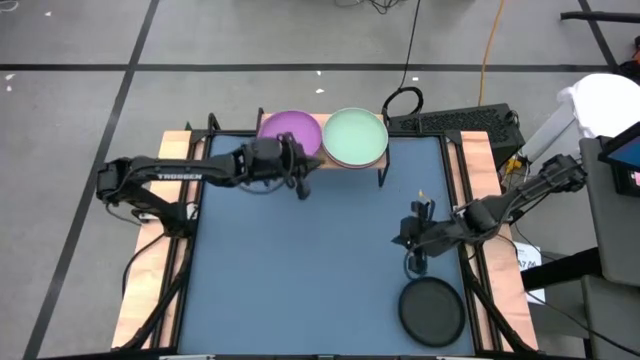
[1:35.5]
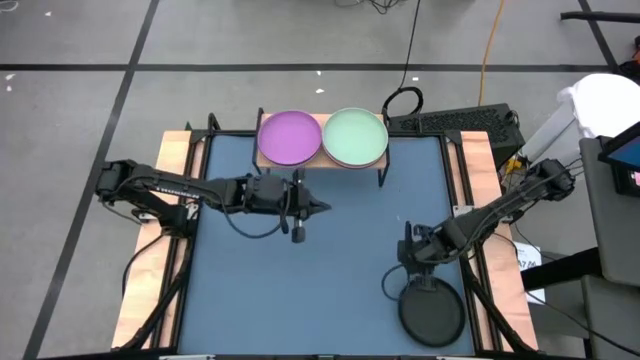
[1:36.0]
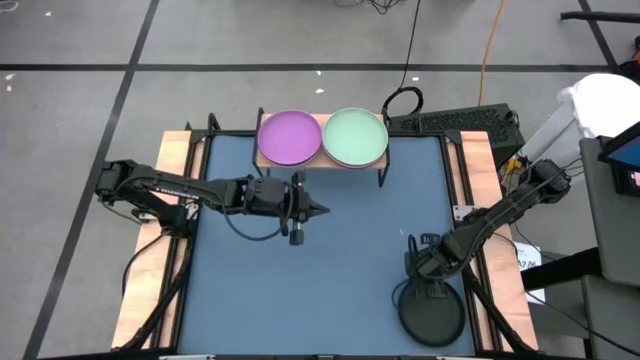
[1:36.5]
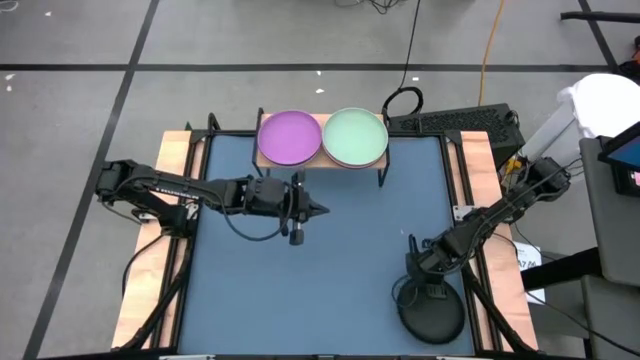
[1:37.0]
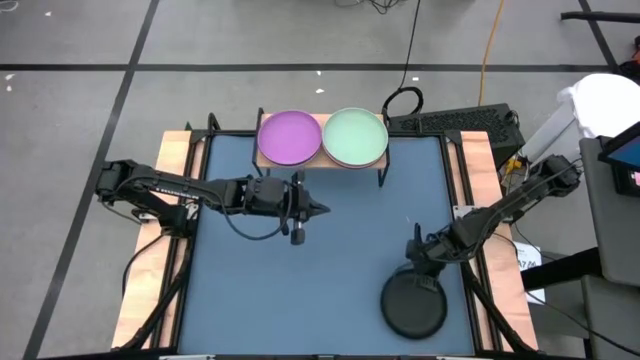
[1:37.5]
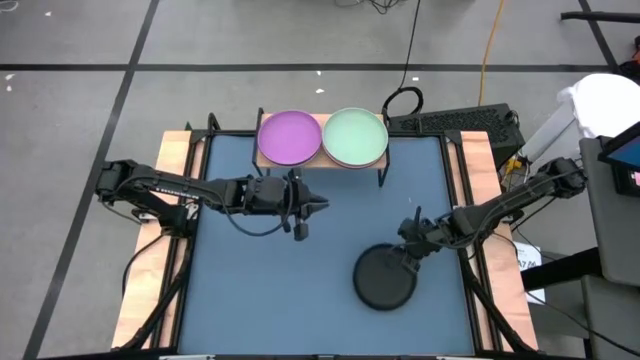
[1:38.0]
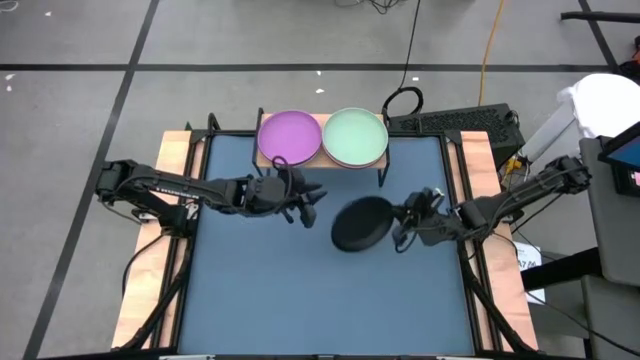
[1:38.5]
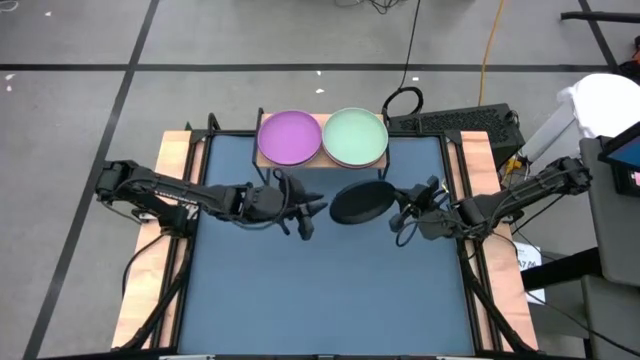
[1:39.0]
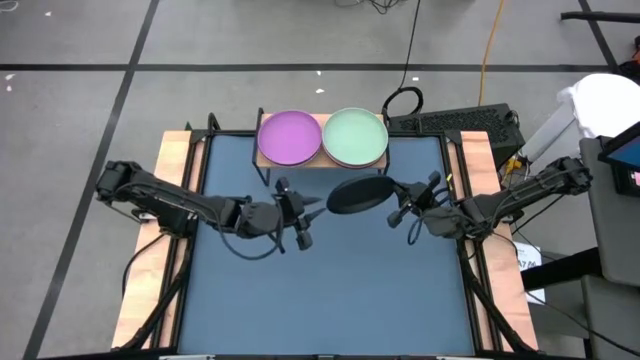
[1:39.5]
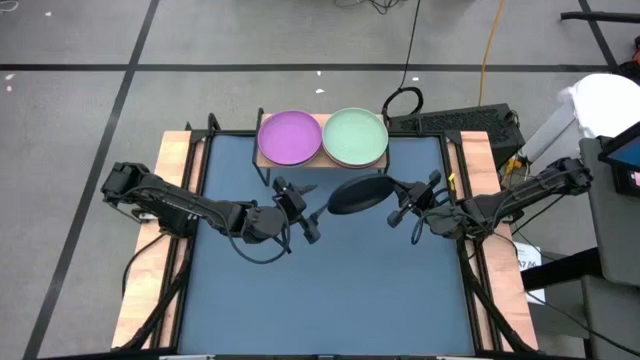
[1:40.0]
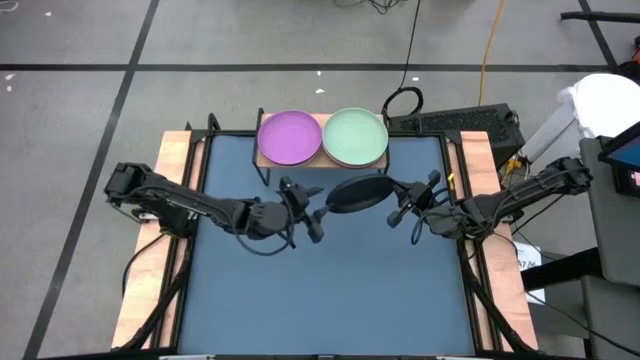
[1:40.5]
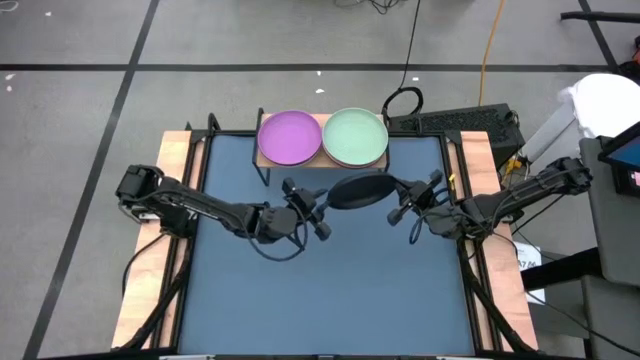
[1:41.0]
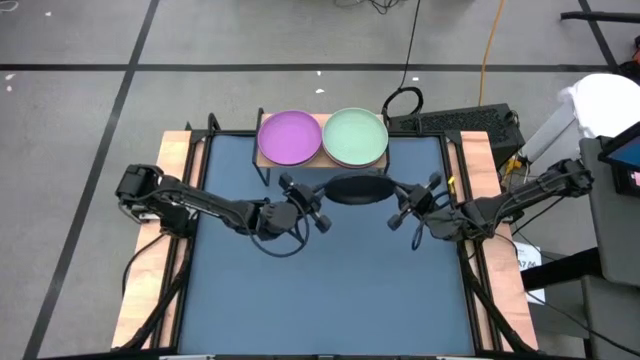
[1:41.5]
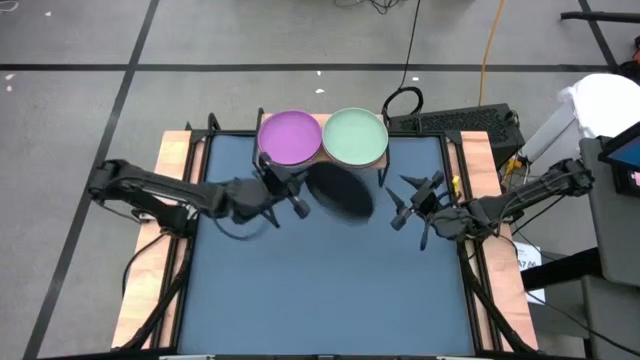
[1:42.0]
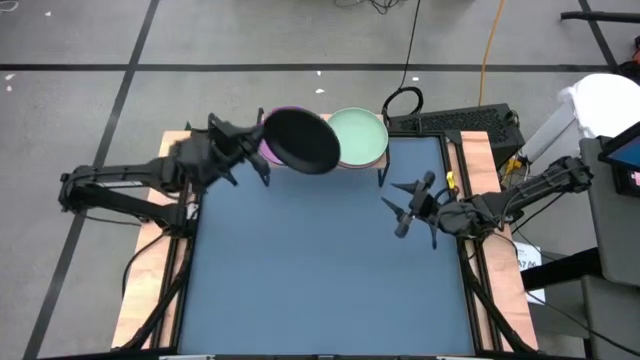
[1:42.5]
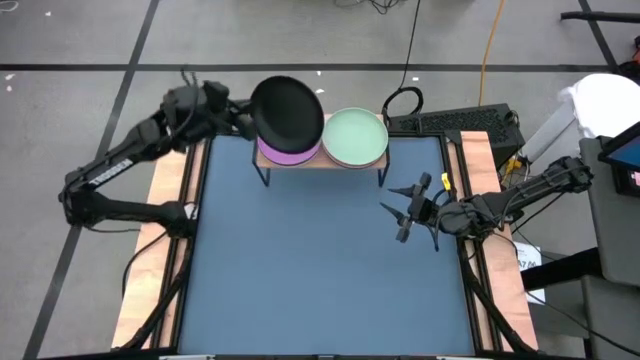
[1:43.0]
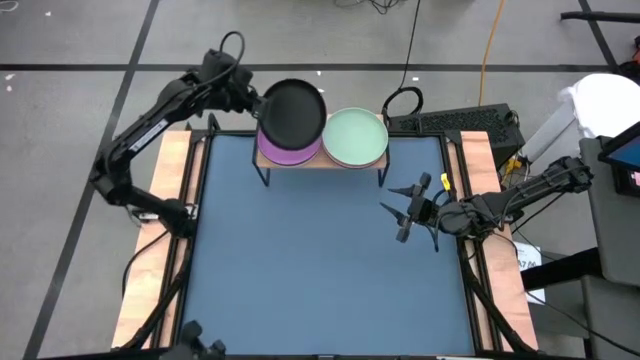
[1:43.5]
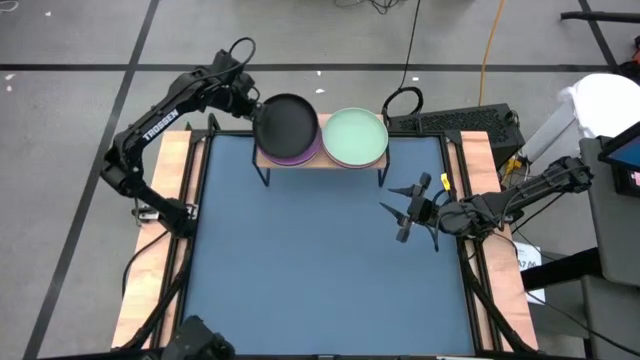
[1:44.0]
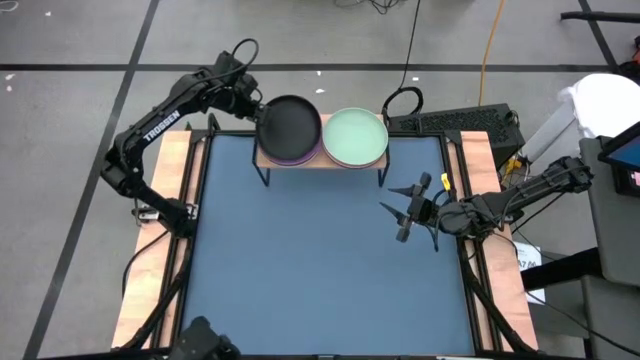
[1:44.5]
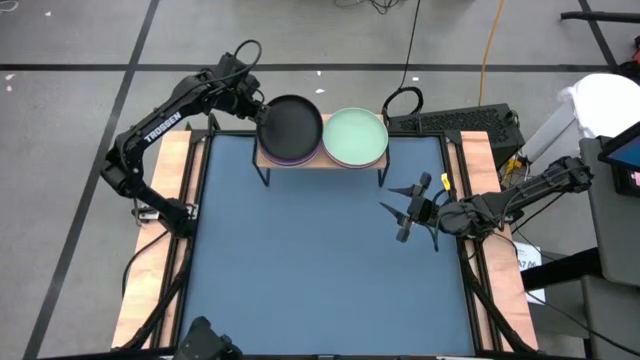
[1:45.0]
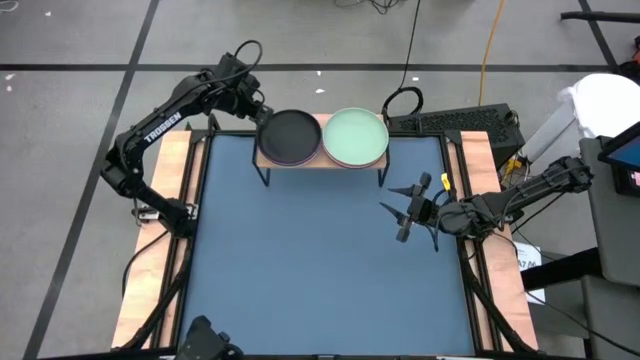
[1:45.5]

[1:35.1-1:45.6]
Task: Place and stack plates onto a shelf
Stack the black plate on top of the purple plate on the shelf

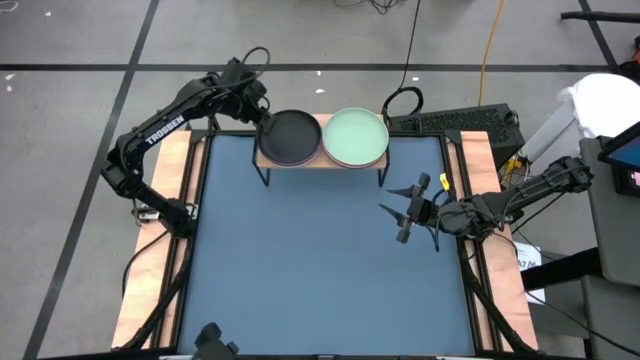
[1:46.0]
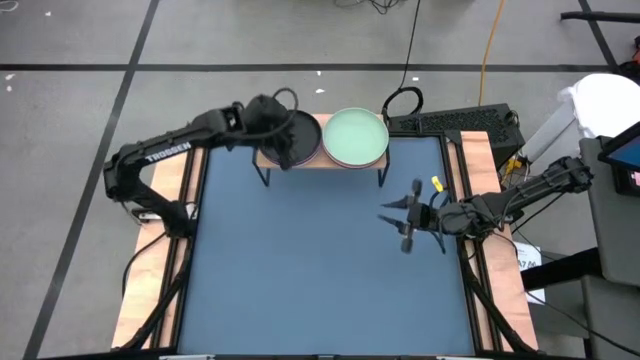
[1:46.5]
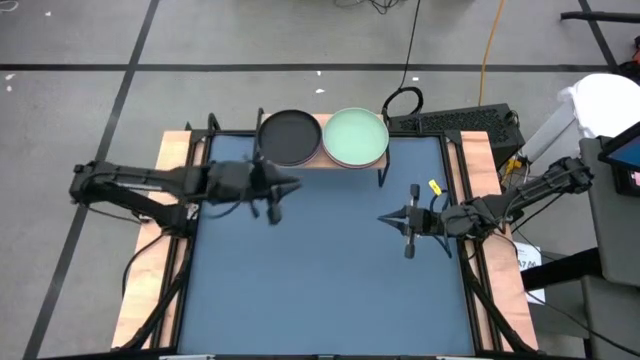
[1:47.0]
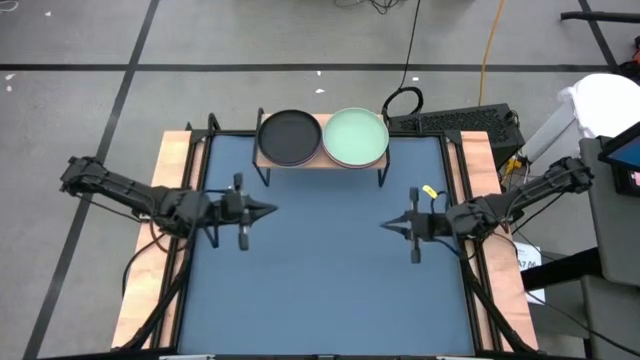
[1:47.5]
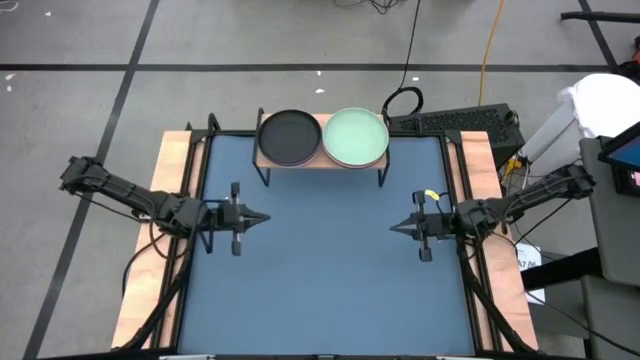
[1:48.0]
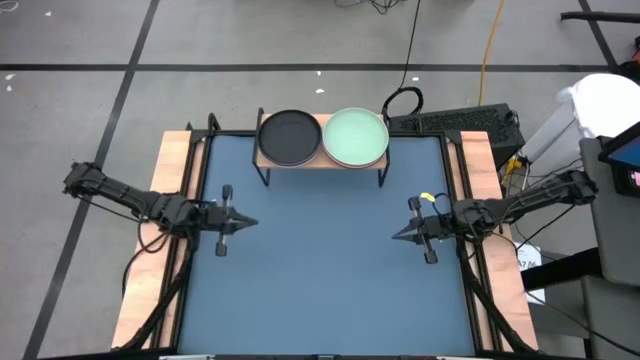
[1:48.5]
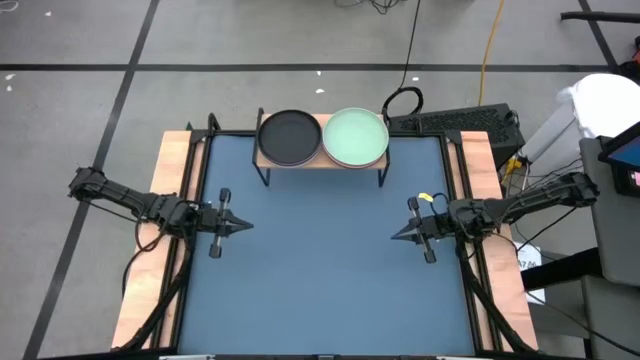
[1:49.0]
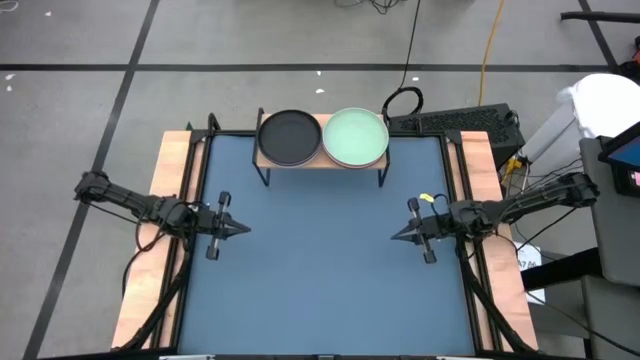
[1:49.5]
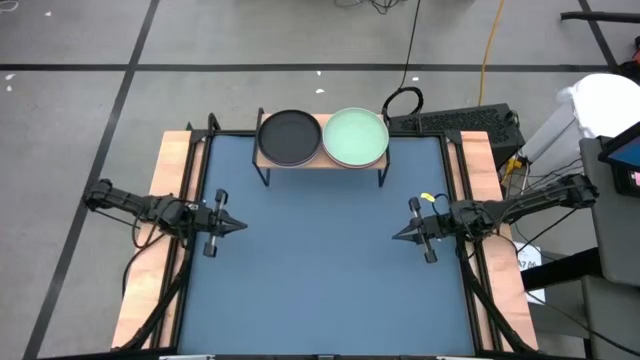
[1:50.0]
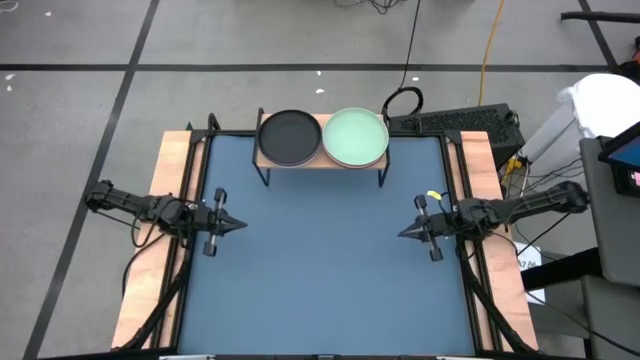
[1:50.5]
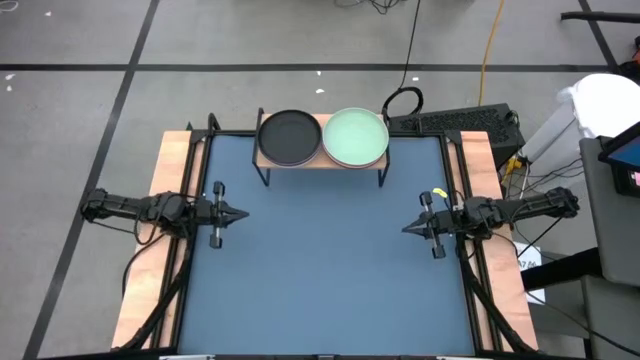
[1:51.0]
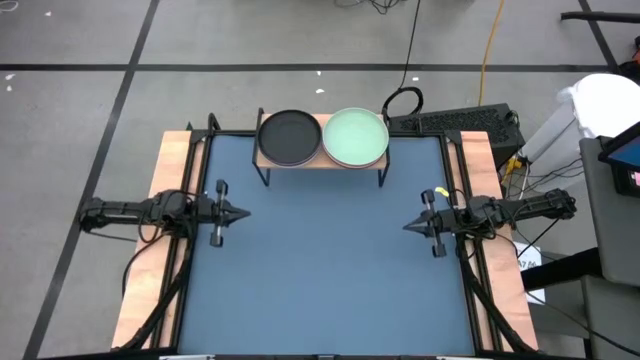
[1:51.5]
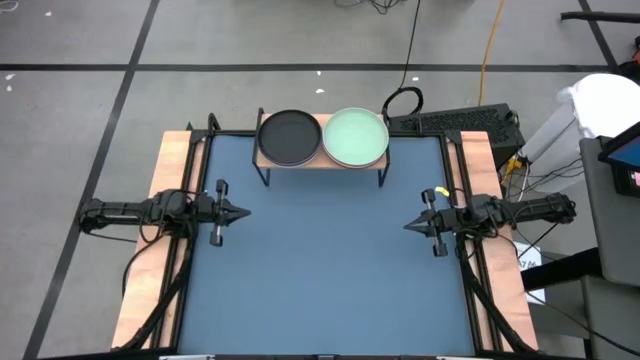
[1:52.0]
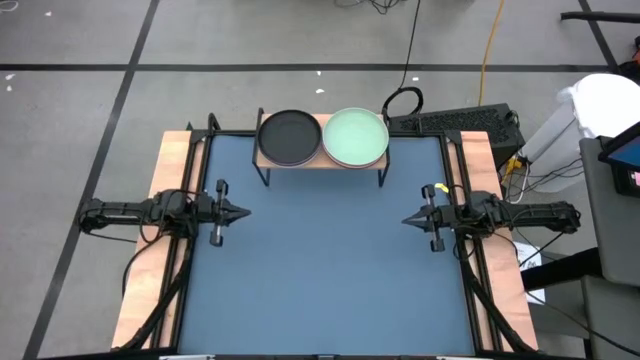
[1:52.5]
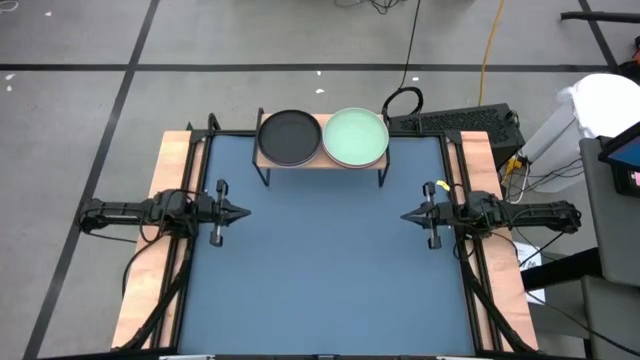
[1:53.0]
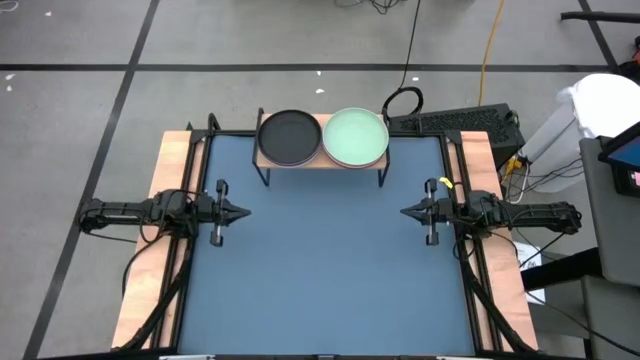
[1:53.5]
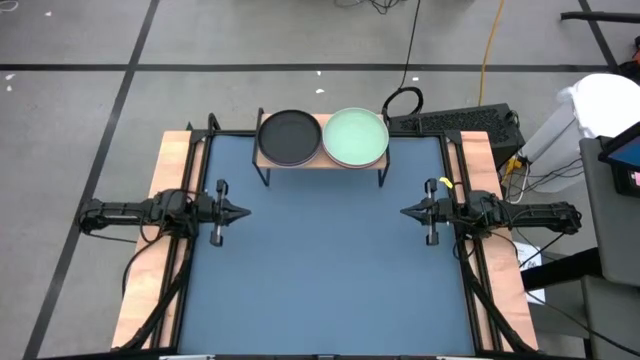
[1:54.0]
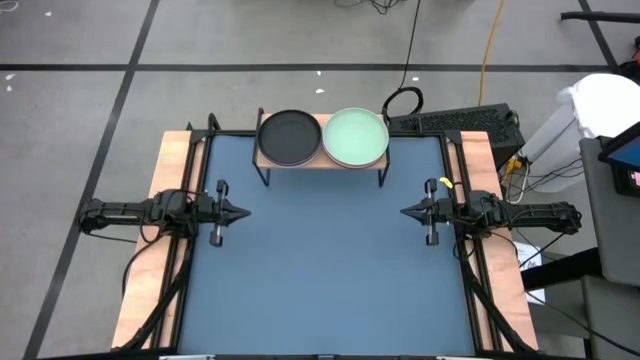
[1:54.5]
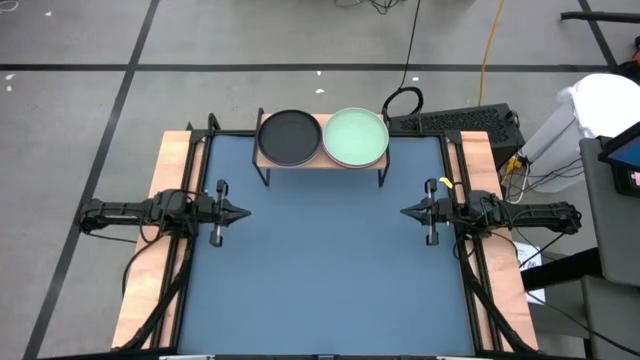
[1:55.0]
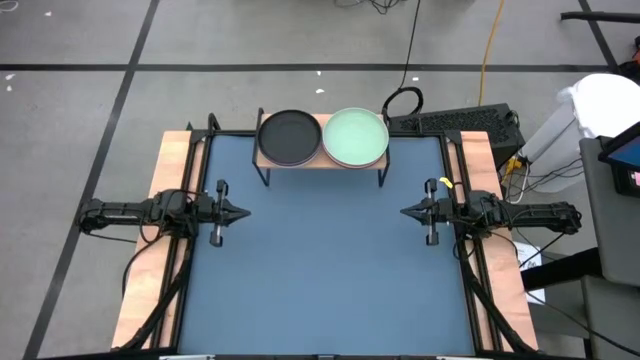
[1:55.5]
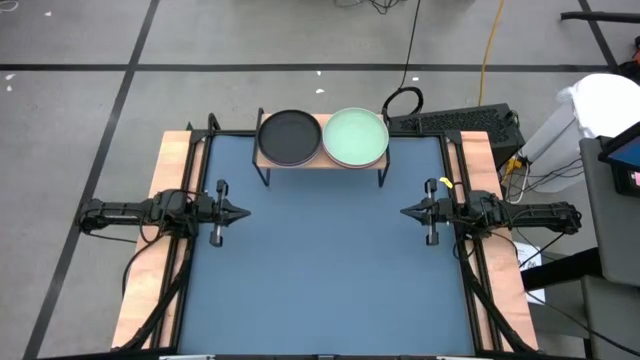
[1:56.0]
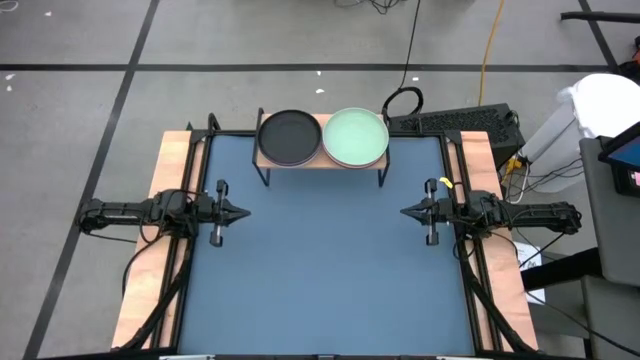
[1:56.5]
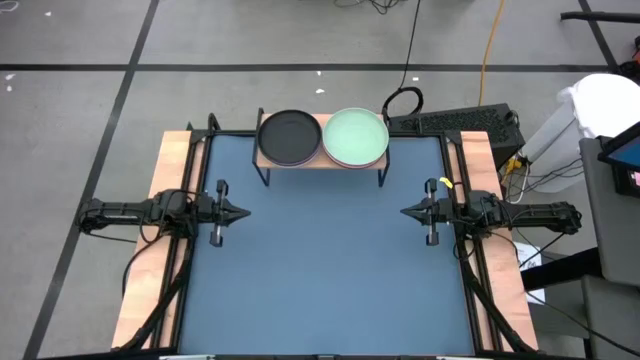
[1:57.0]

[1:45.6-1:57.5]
Return to Home Position
